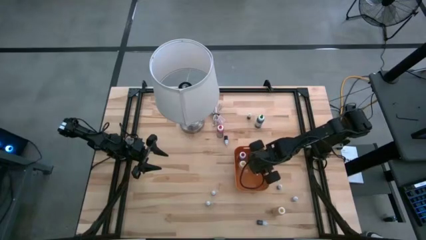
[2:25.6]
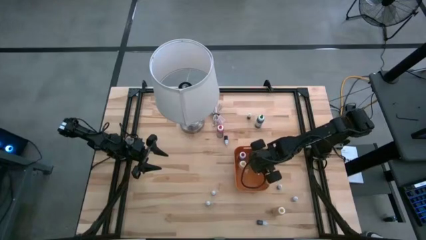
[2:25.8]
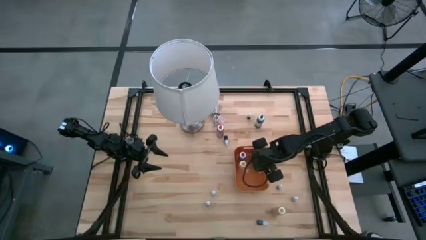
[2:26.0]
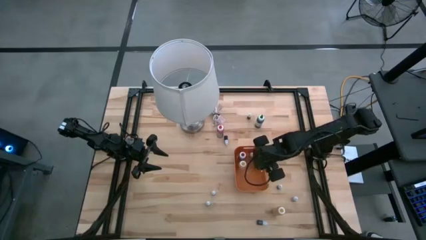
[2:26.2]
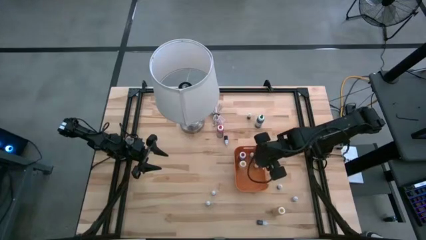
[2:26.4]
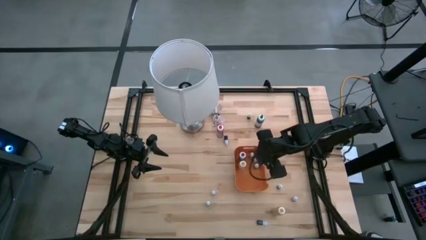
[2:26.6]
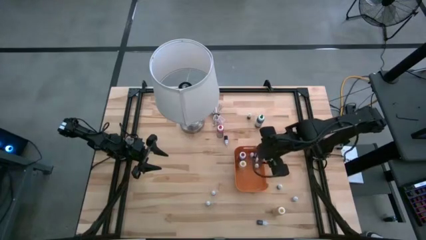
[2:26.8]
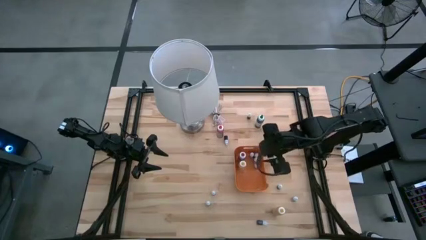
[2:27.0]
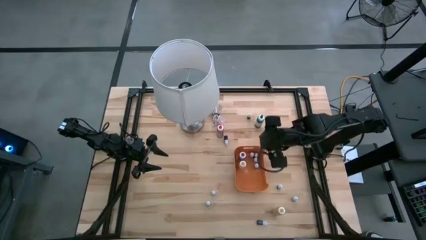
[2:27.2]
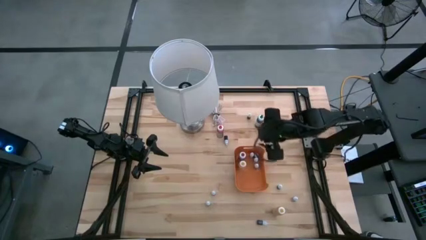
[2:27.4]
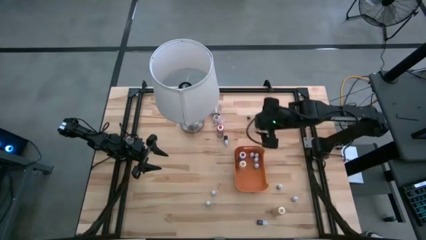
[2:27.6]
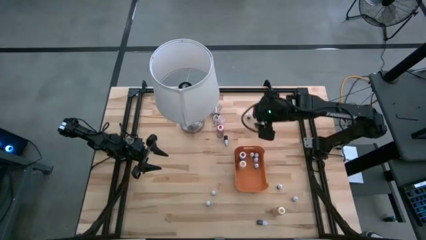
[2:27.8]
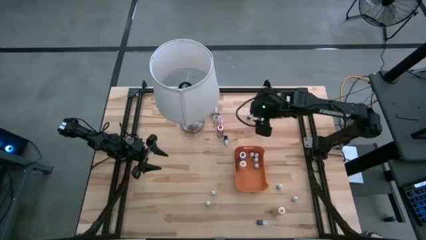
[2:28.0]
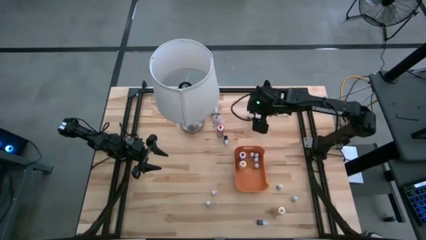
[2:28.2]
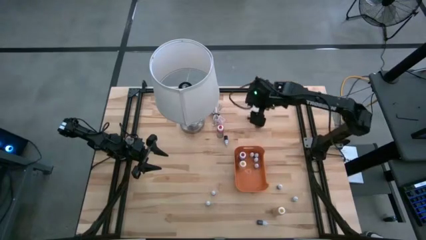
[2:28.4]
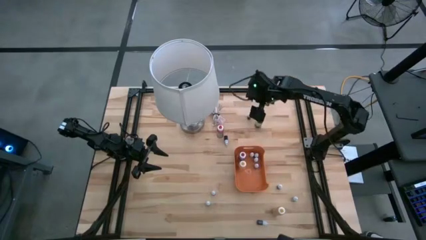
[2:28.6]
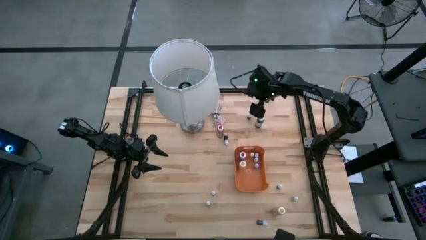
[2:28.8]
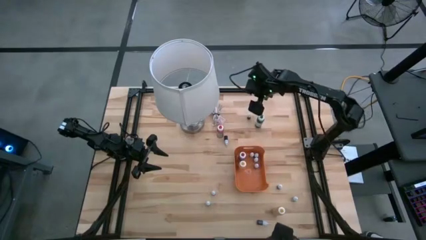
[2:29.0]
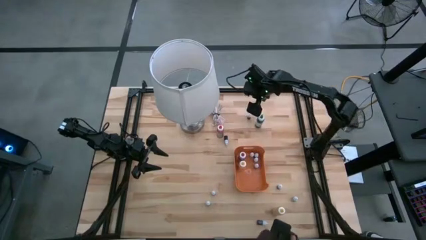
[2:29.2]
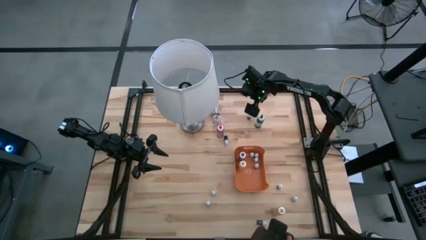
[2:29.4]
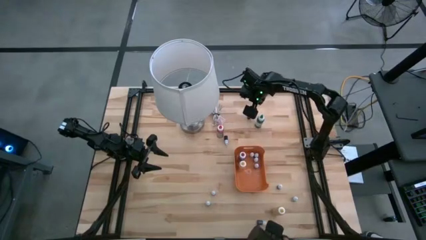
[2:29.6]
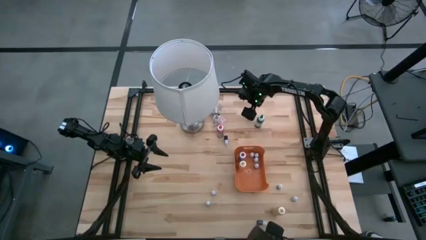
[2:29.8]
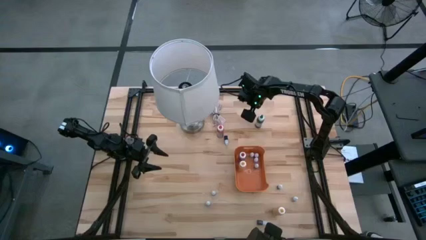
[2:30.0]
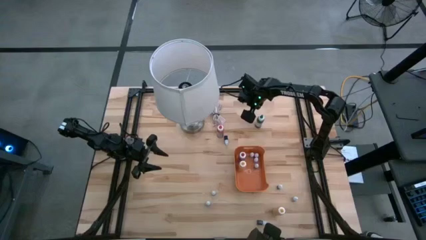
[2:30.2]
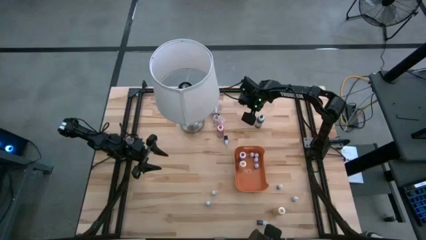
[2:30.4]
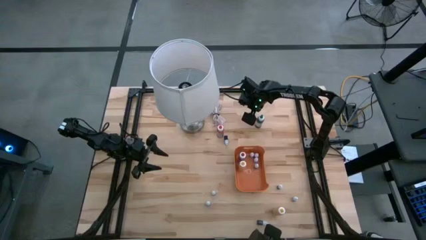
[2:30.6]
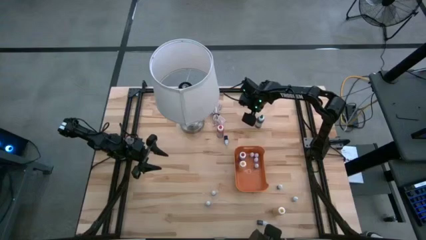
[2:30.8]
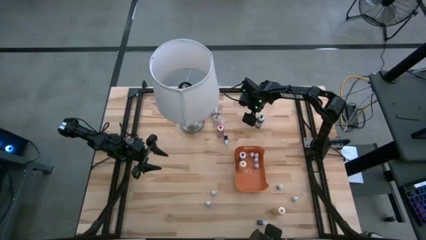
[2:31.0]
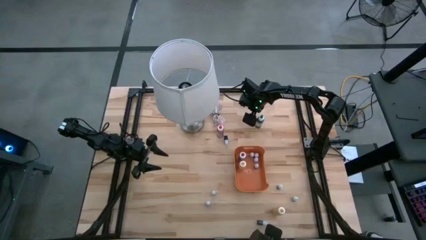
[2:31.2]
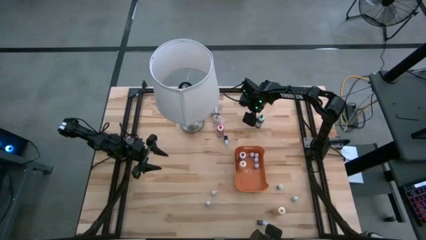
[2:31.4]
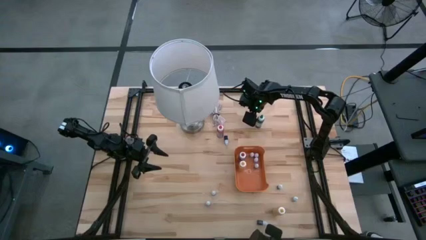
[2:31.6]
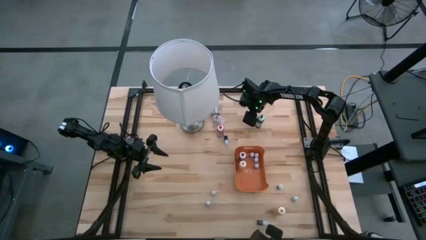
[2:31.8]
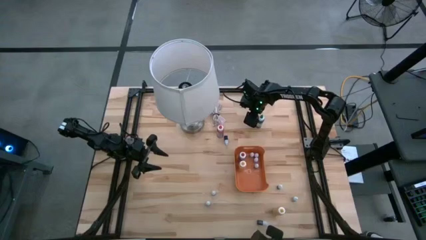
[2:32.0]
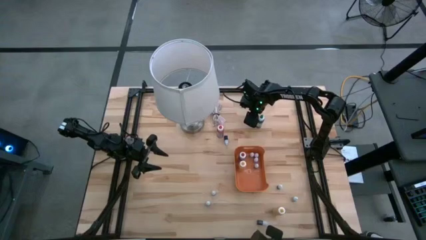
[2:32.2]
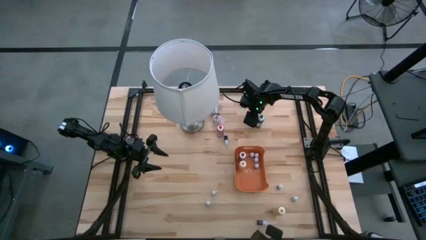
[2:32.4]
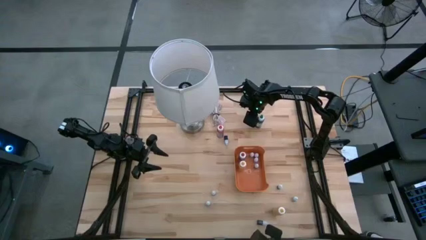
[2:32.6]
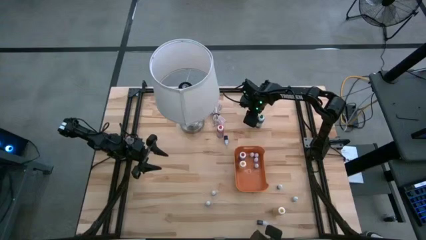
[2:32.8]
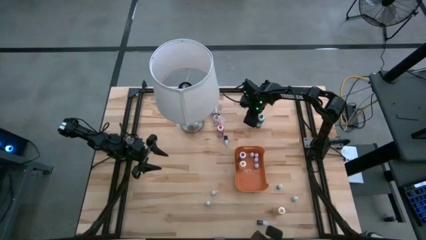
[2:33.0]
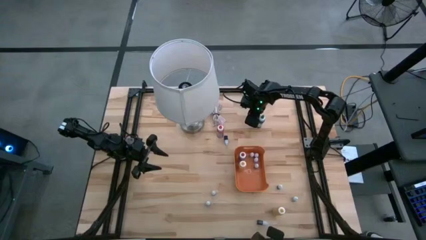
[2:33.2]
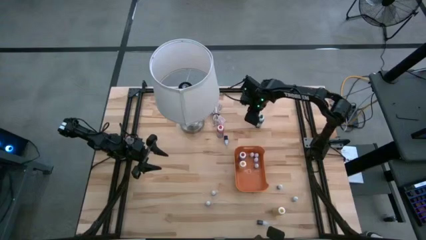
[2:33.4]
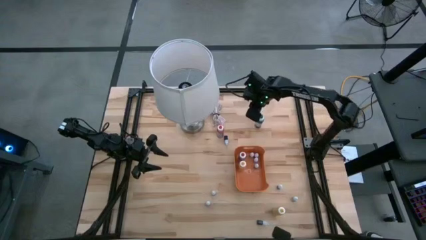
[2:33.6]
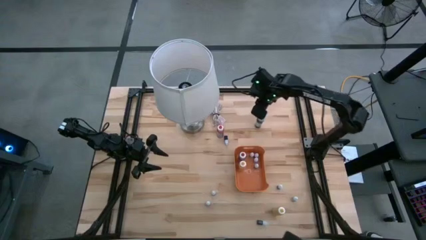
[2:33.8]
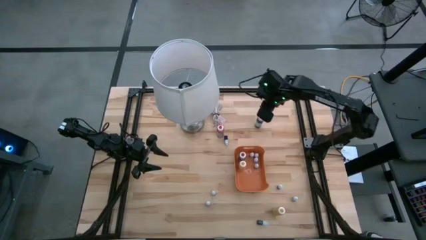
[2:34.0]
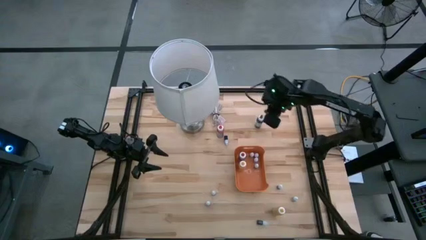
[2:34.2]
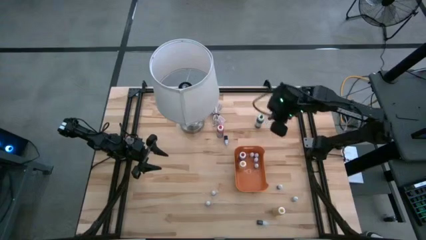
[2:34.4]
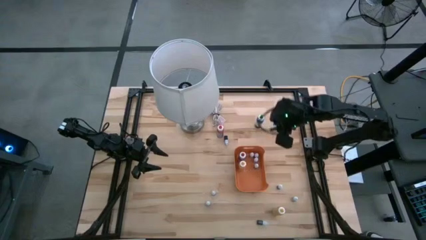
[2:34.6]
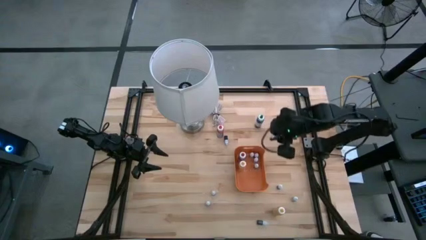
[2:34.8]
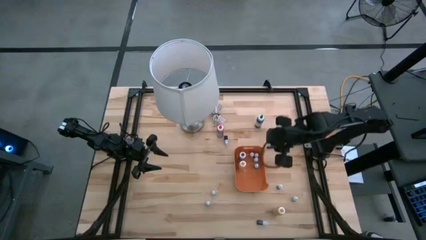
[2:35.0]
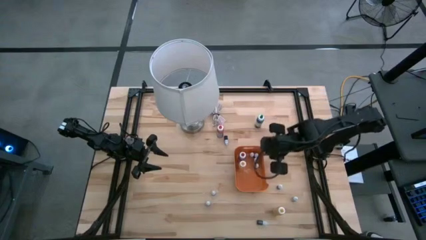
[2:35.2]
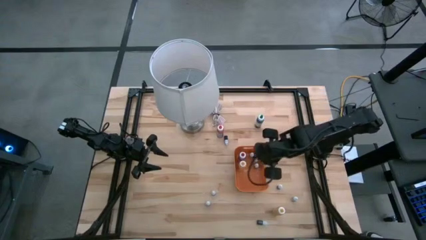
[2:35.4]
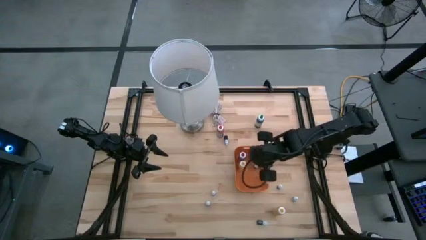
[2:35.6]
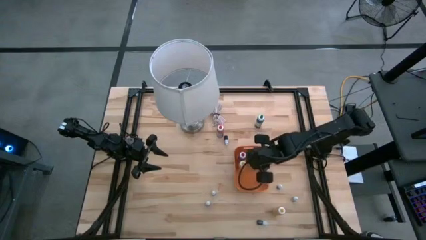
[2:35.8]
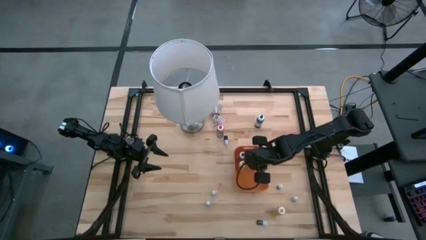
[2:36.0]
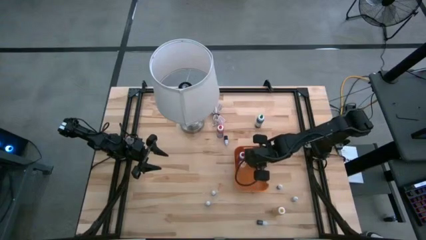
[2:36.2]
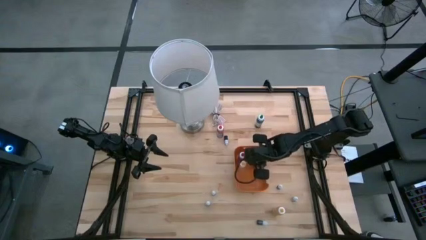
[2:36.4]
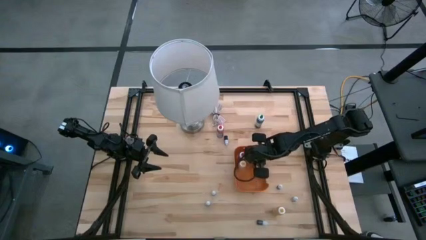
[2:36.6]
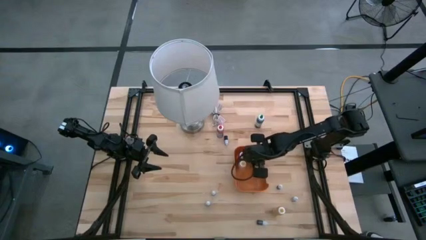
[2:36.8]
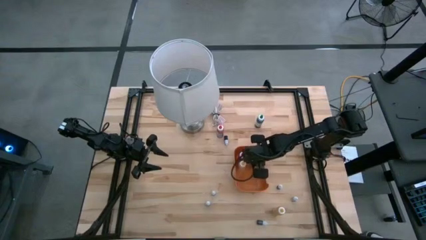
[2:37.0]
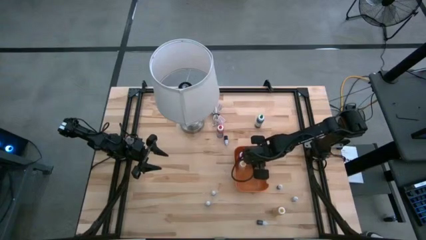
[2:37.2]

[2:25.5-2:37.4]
Task: Pick & Place food coloring
Put the small food coloring bottle into the orange bin
